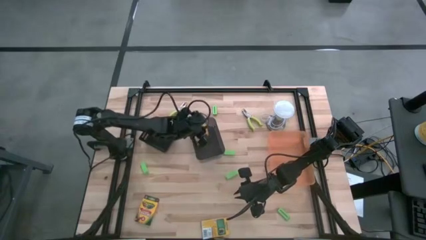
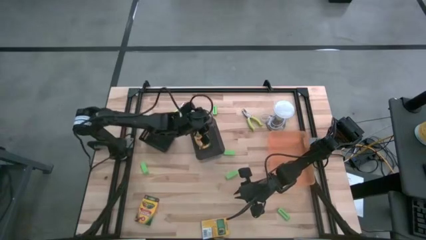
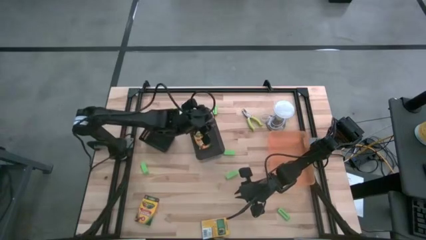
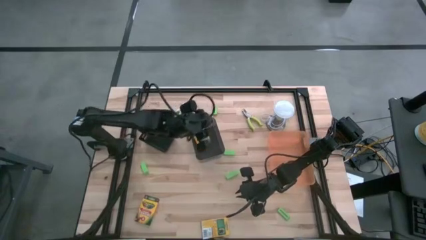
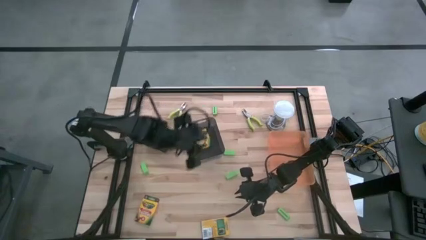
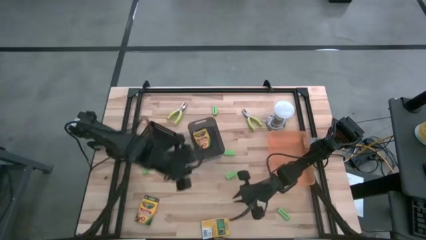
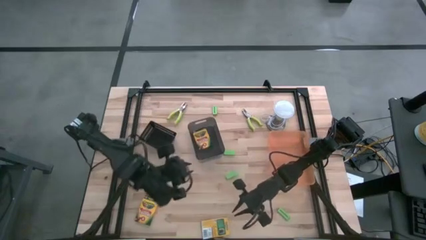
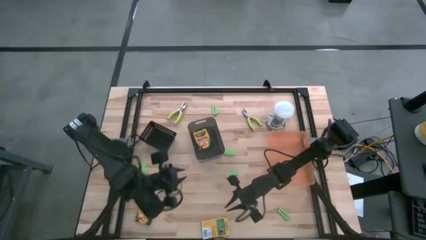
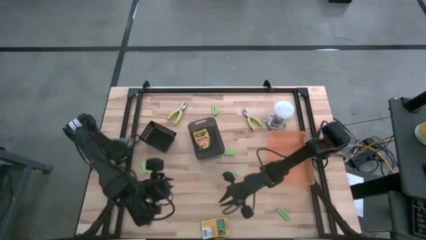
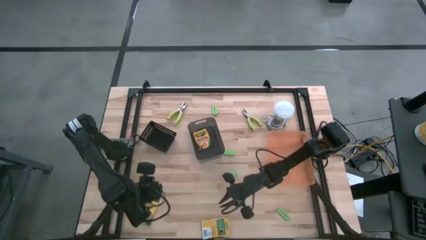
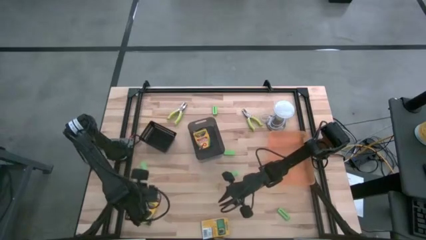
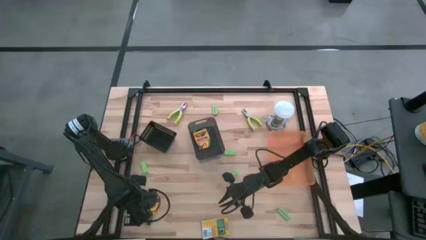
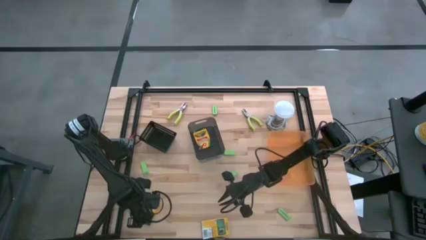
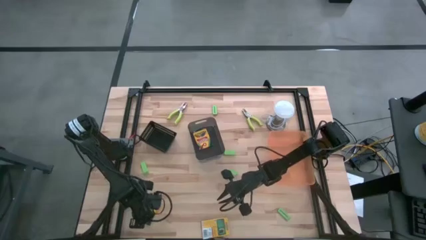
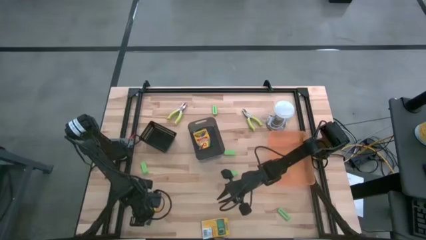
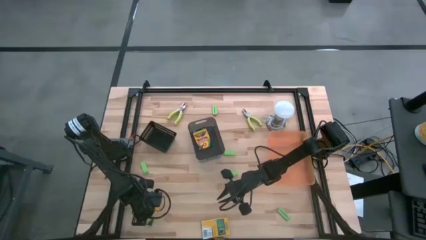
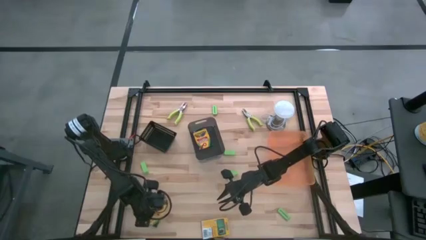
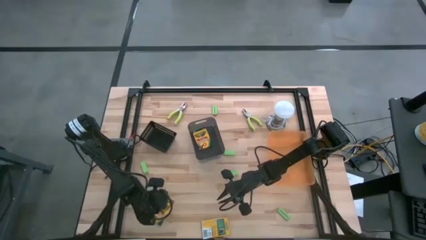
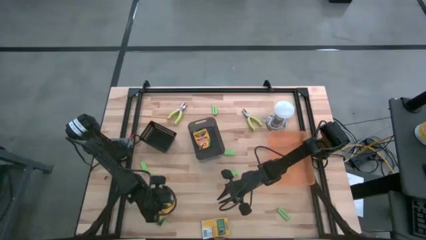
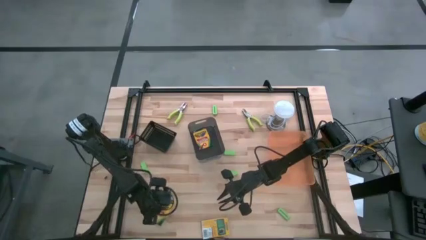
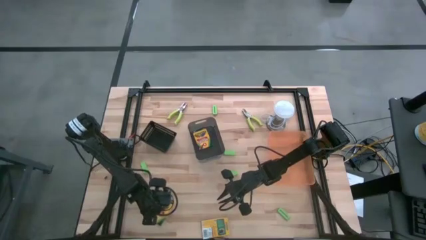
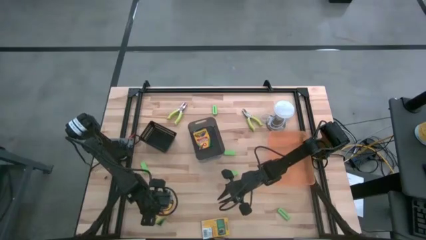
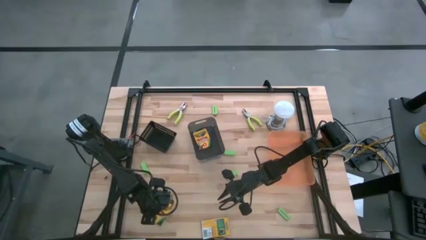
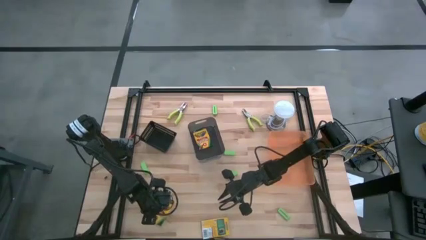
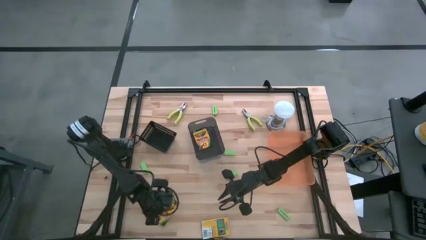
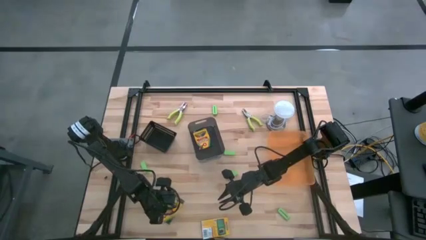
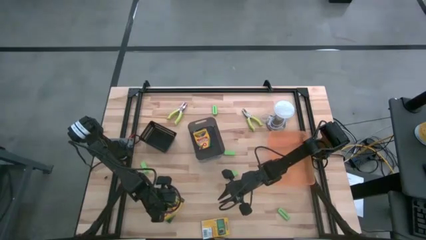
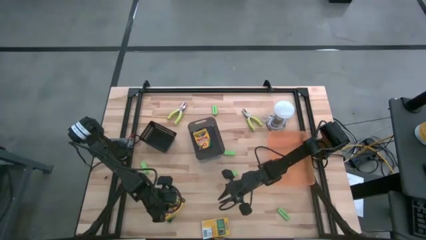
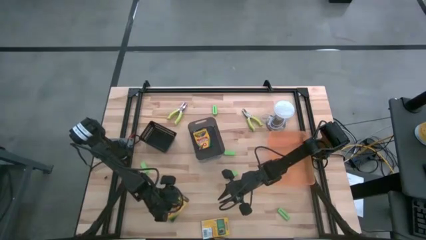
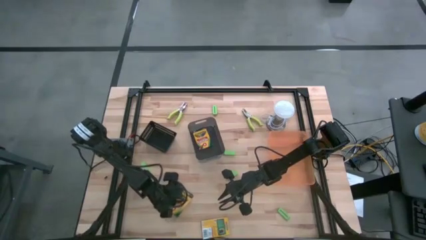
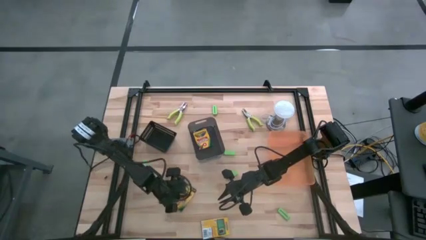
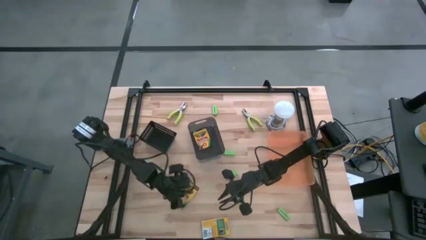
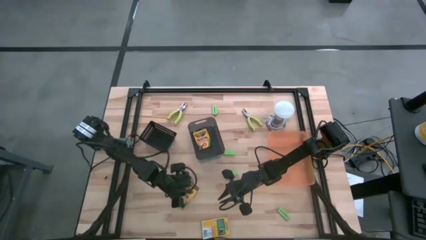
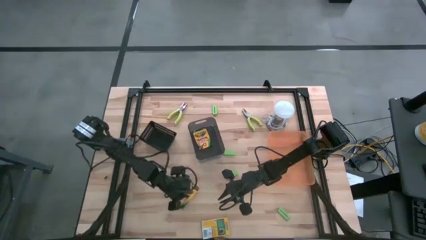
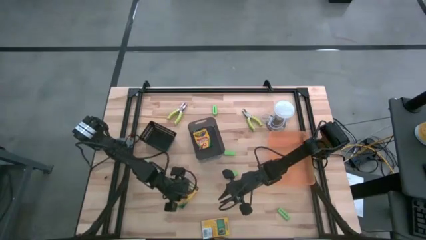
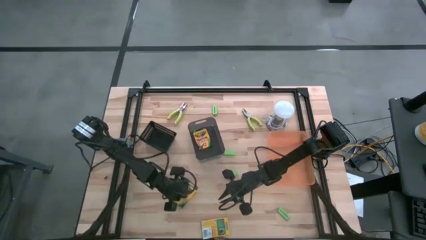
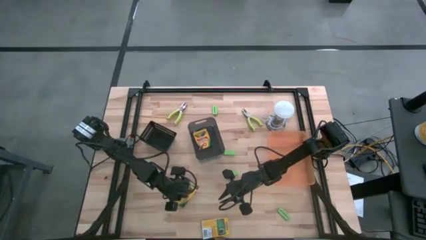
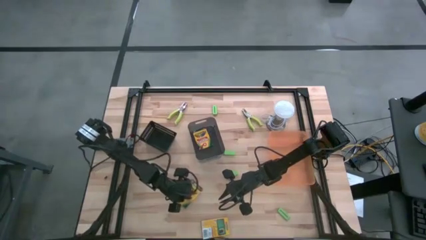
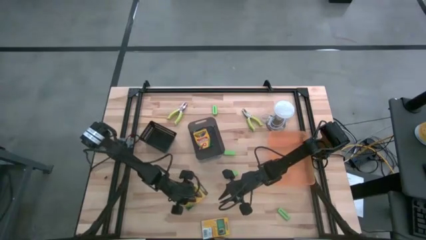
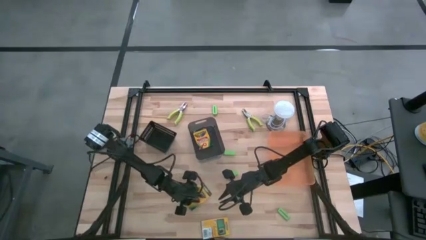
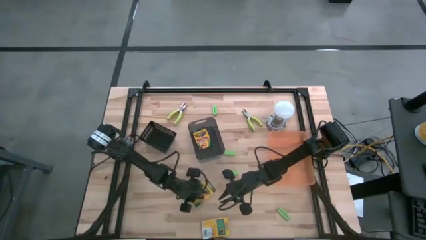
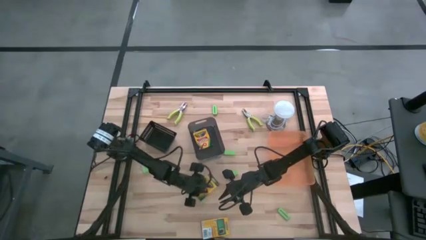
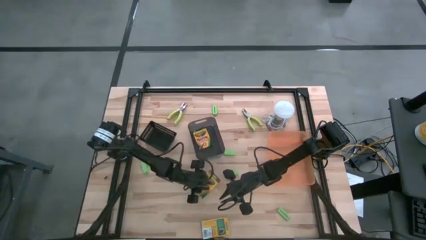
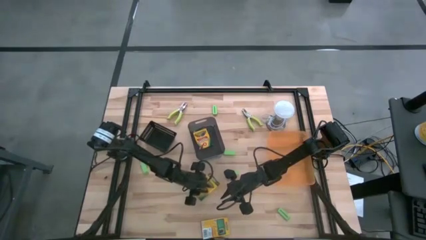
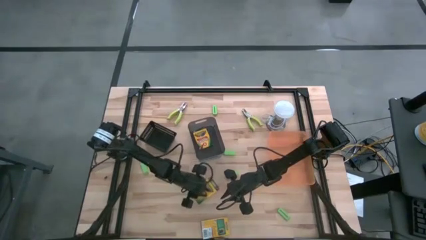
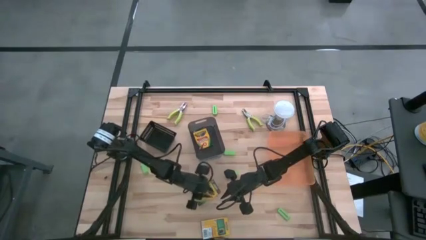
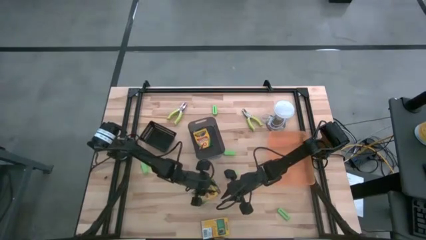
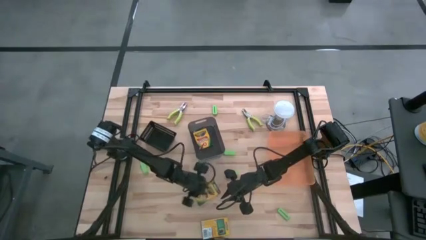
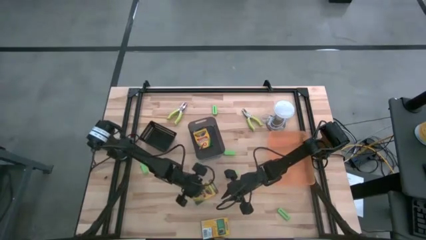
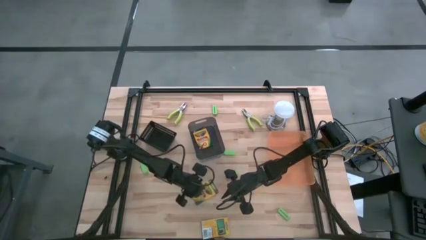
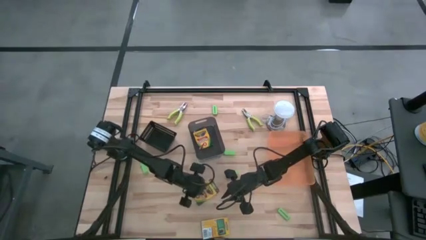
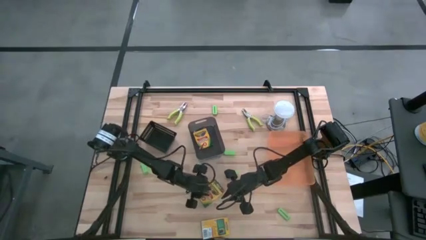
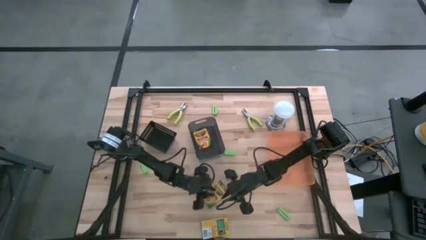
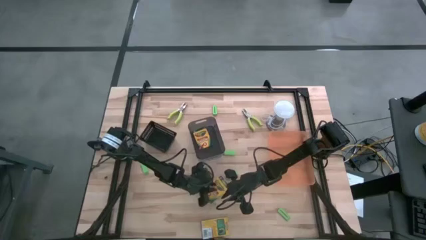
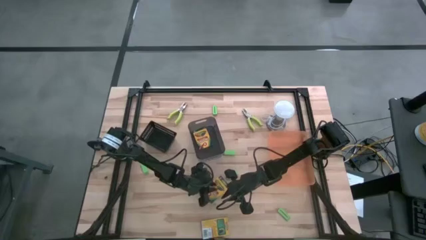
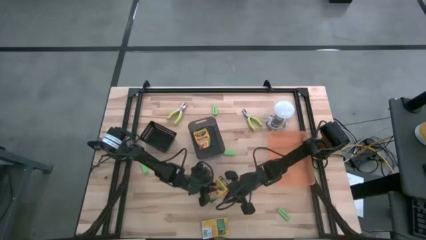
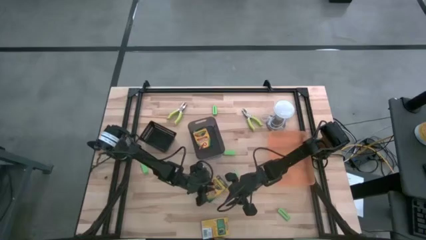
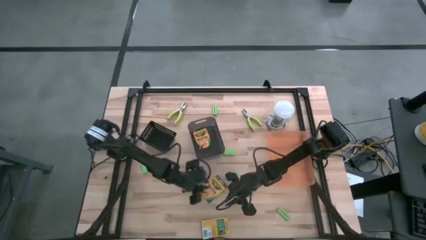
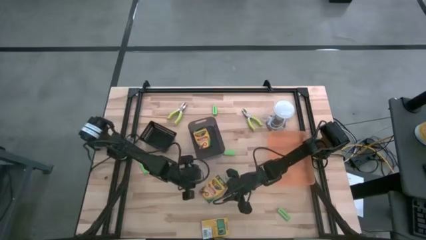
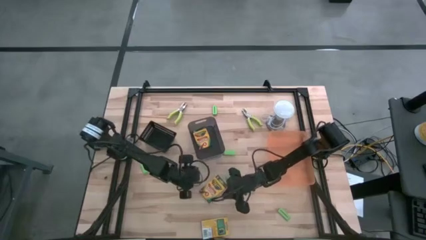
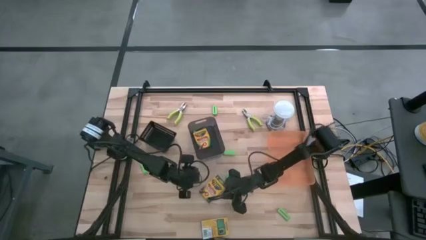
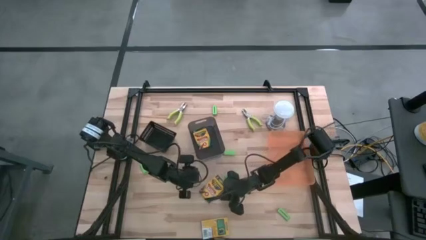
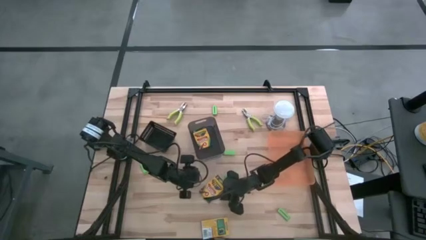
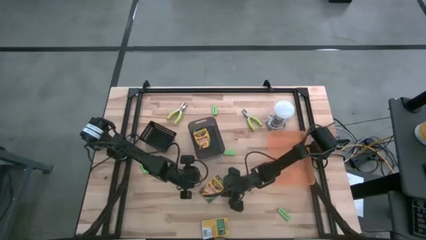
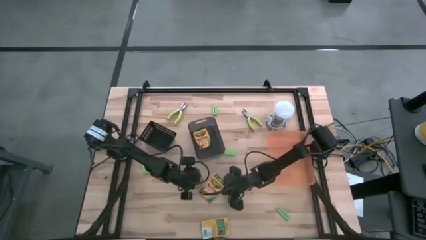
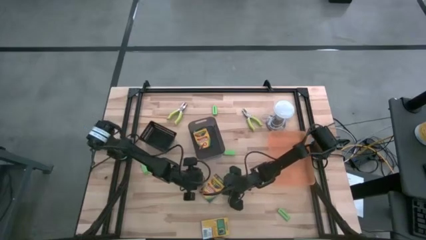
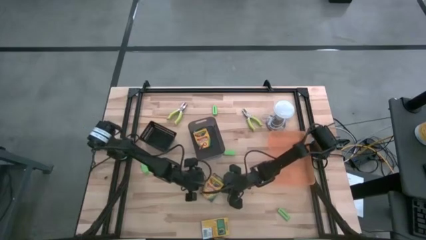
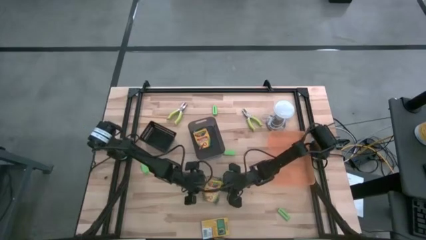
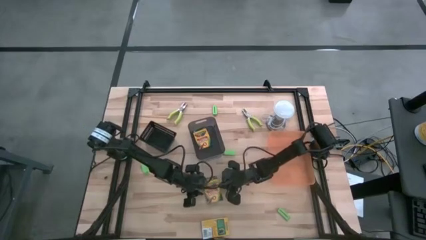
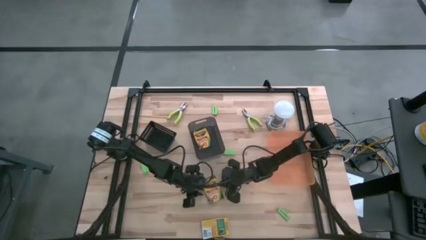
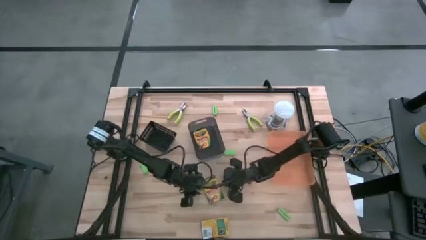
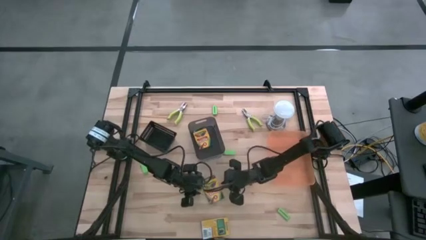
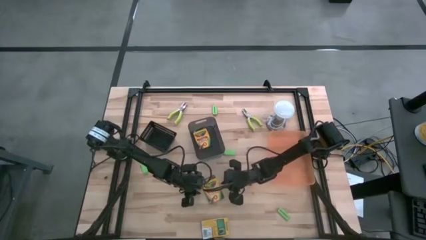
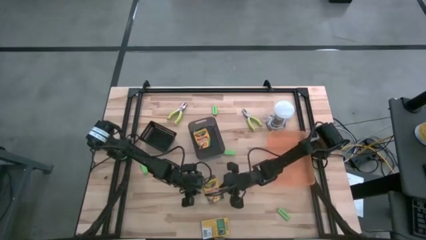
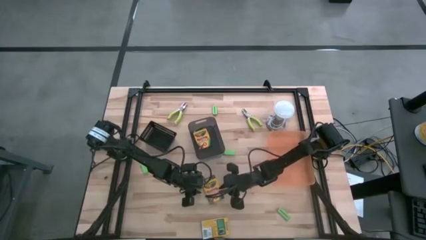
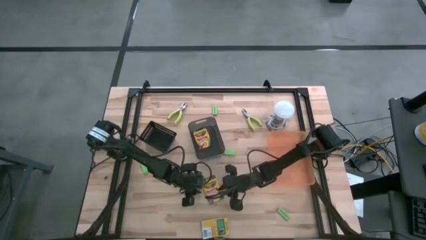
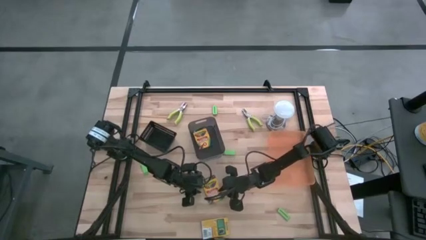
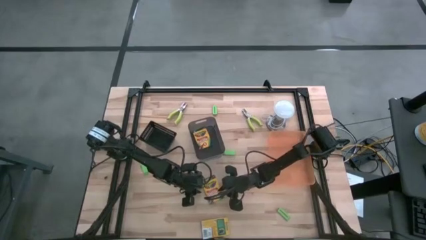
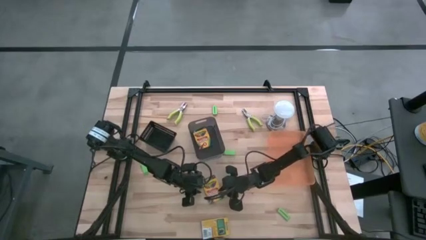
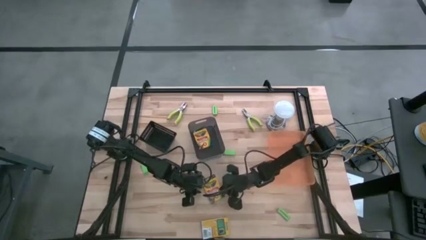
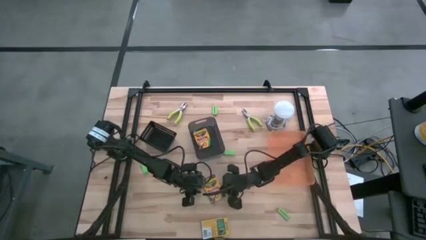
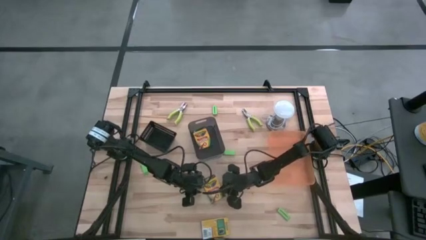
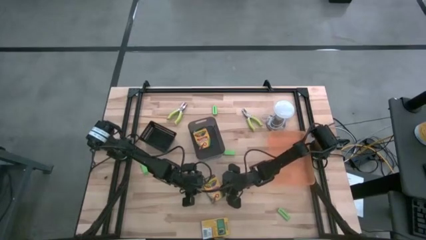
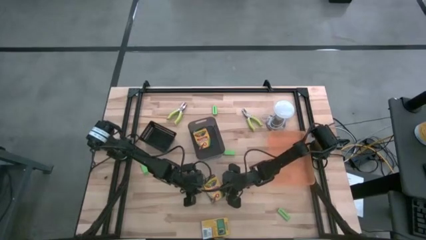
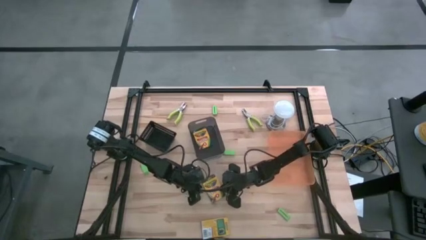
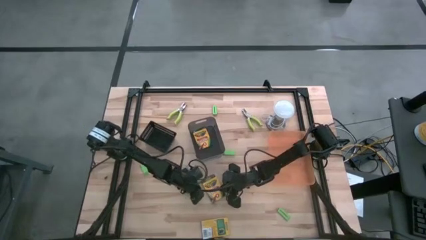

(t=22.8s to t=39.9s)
Task: Pick & Place School Supplies
Put the left yellow crayon box into the black transparent bin
